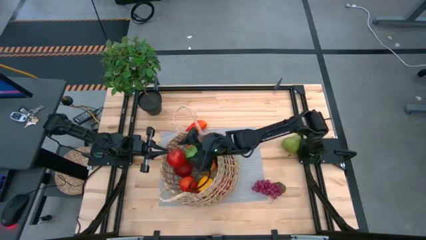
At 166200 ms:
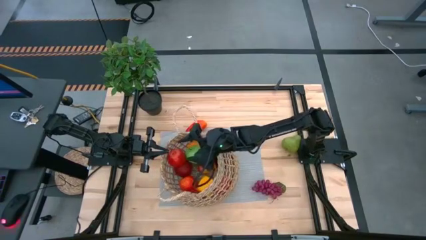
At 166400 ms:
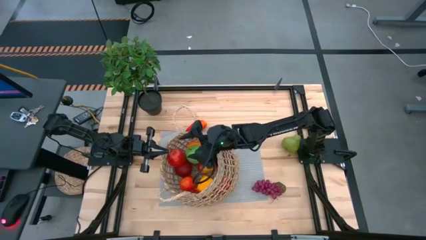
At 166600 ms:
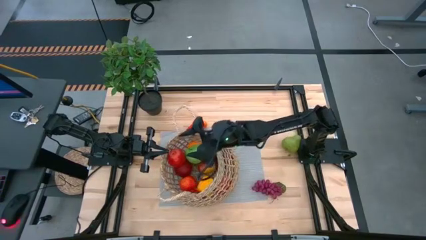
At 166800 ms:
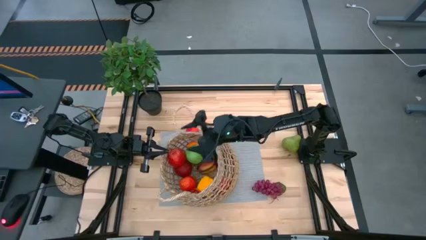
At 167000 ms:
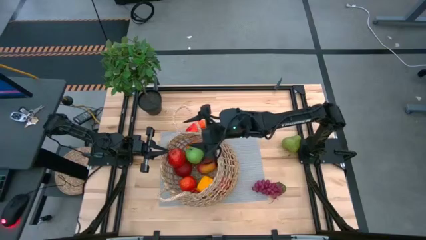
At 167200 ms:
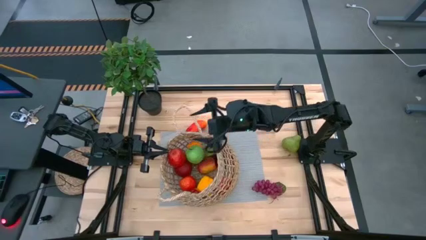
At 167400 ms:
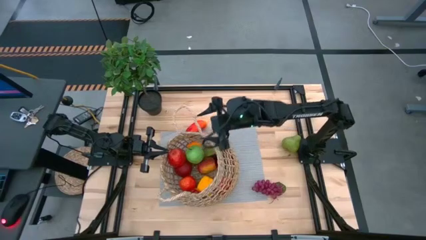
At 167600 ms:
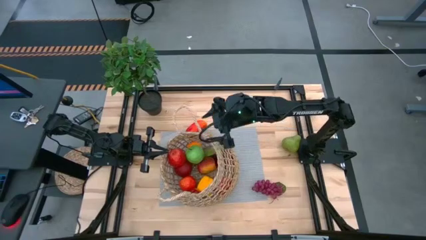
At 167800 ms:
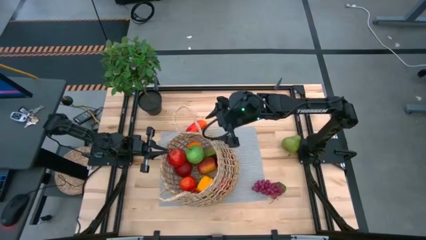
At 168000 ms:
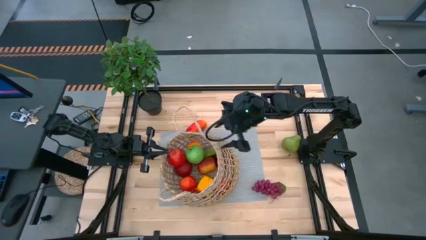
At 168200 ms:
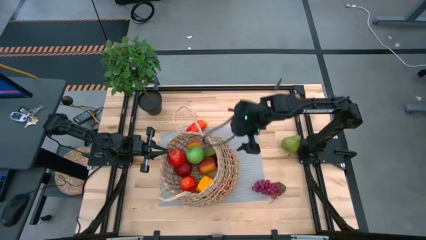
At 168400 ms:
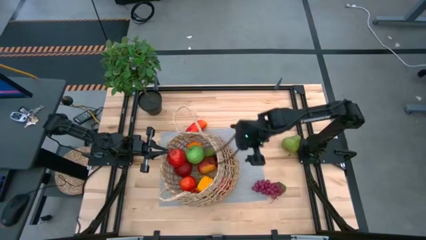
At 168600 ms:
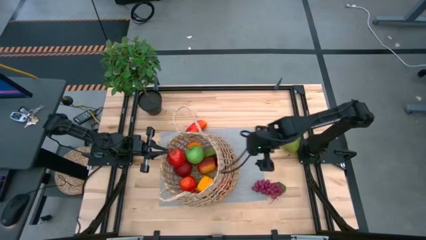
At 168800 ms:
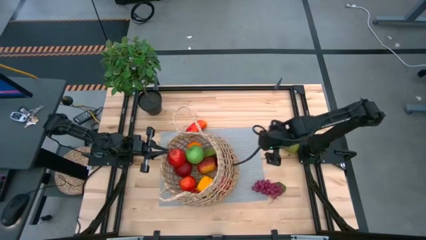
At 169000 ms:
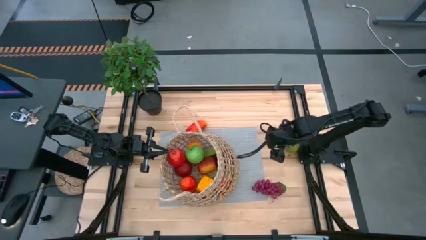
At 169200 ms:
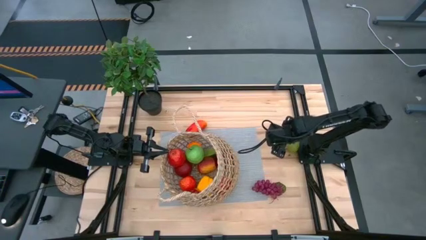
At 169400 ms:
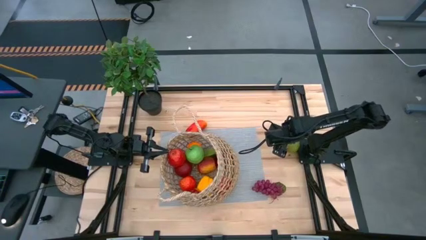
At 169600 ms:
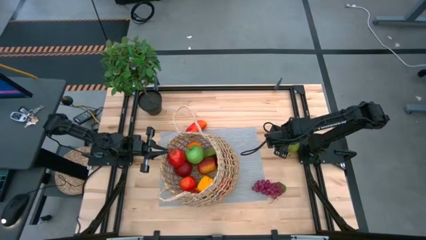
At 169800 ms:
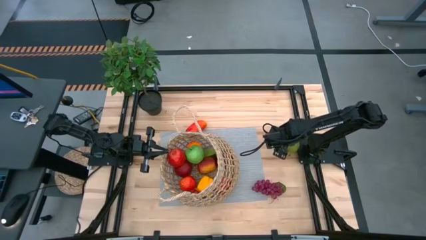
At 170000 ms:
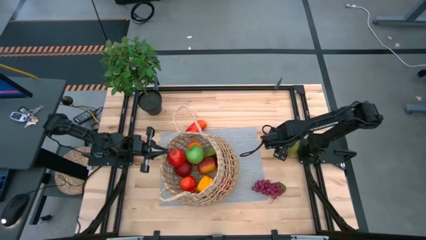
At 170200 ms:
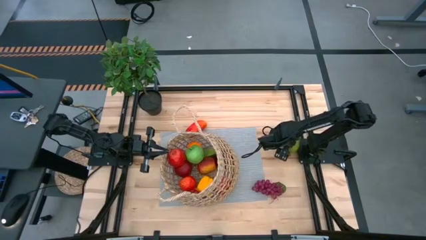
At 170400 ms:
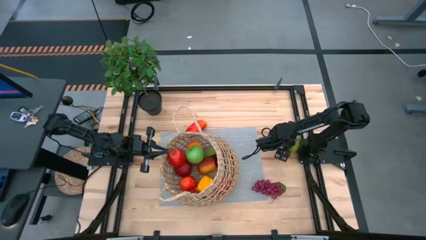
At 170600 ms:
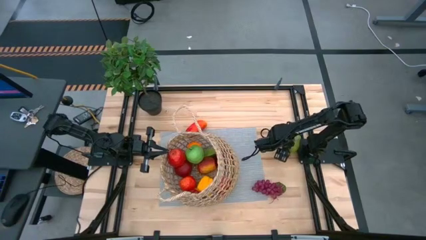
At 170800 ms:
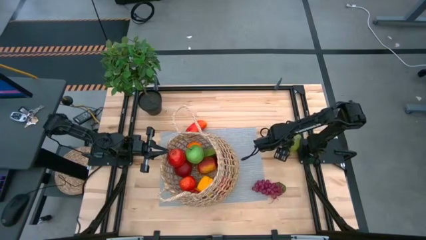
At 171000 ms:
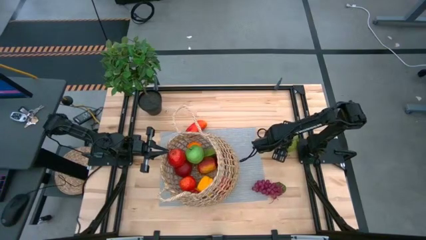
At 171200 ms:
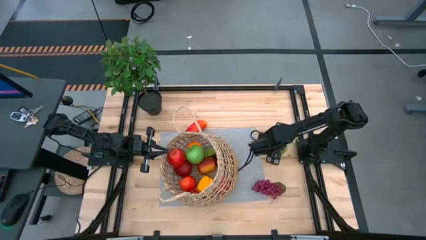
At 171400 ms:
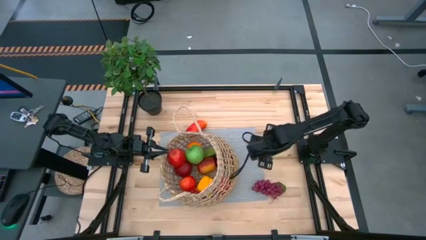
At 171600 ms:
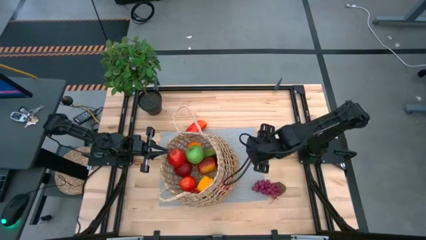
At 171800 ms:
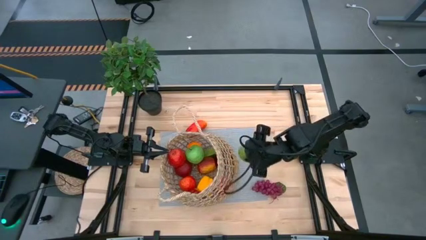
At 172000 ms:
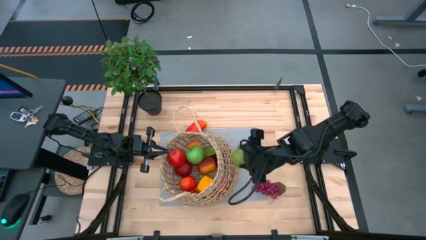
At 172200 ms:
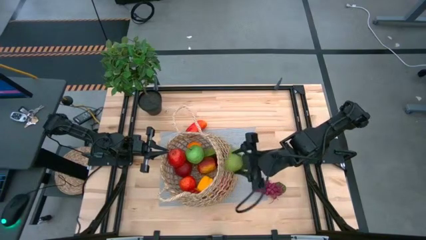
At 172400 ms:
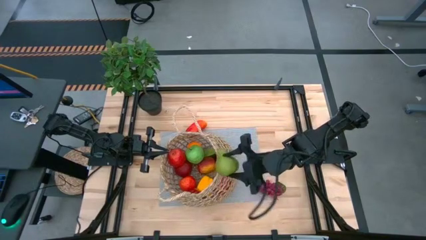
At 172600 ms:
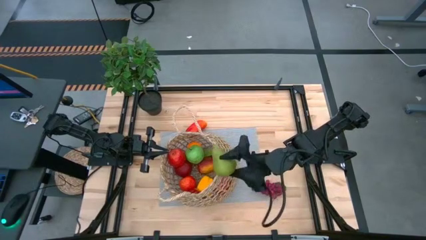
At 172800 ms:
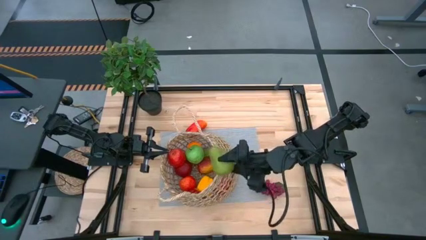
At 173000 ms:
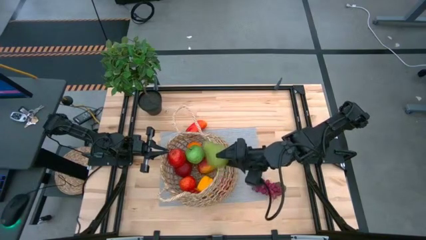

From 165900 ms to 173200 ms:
Task: Build produce basket
Put the green pear into the brown woven basket

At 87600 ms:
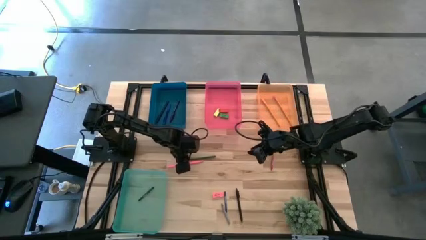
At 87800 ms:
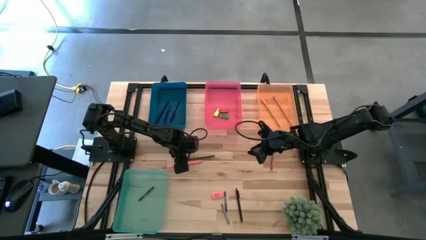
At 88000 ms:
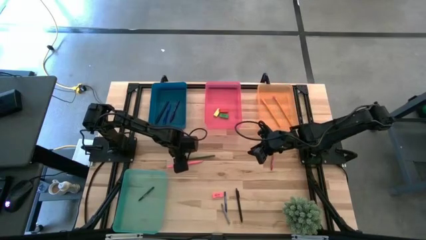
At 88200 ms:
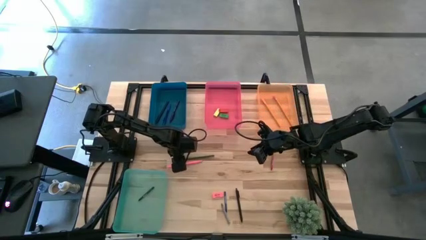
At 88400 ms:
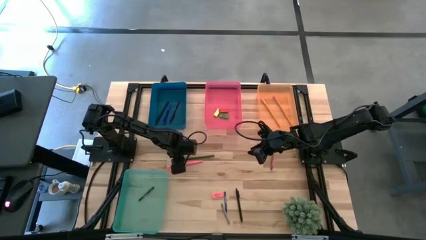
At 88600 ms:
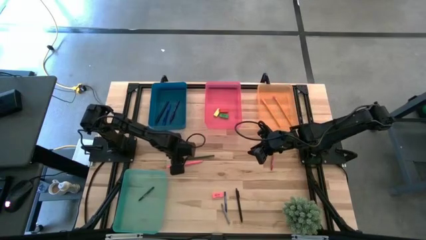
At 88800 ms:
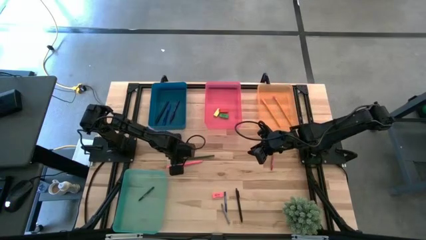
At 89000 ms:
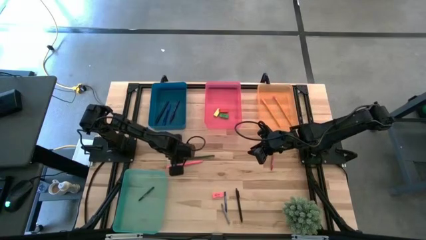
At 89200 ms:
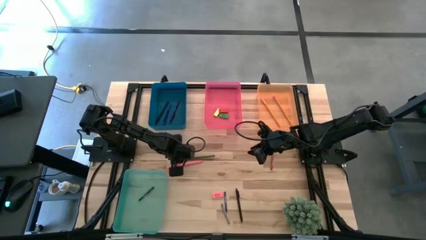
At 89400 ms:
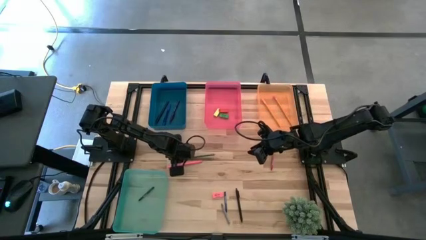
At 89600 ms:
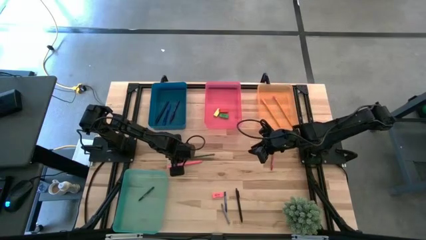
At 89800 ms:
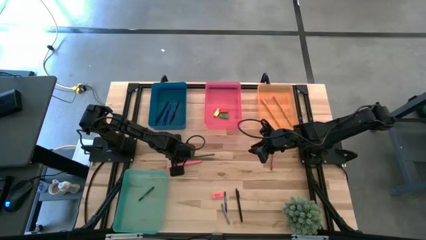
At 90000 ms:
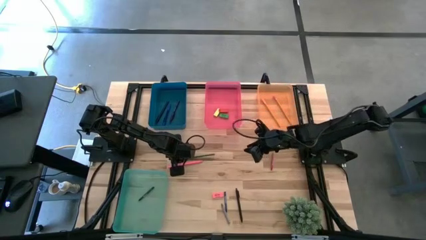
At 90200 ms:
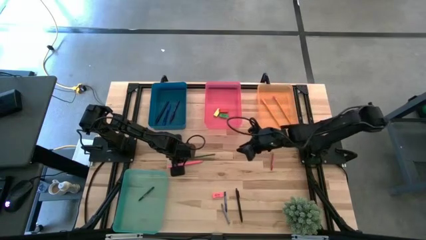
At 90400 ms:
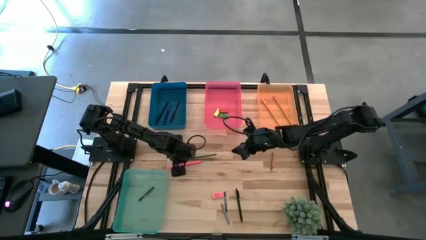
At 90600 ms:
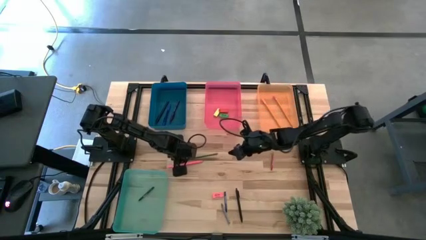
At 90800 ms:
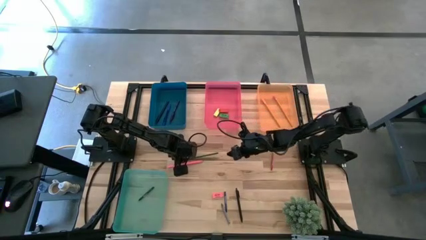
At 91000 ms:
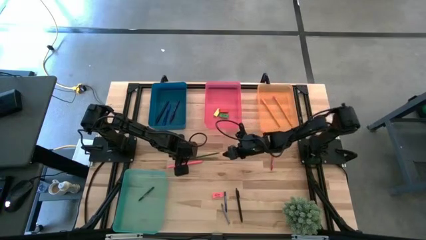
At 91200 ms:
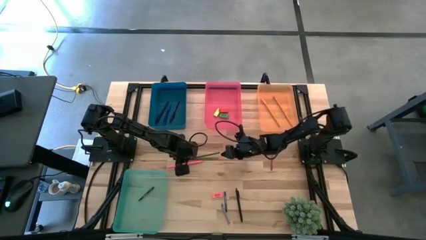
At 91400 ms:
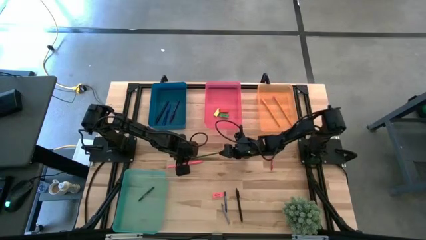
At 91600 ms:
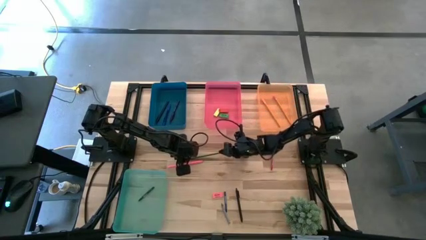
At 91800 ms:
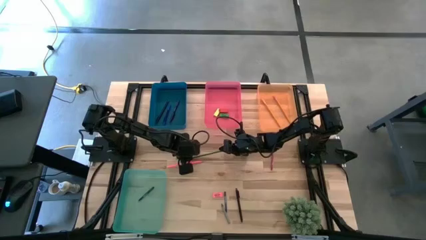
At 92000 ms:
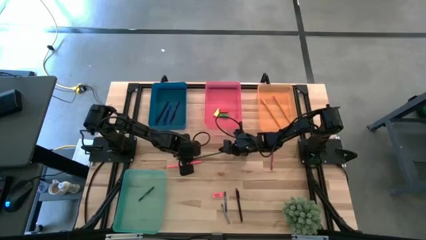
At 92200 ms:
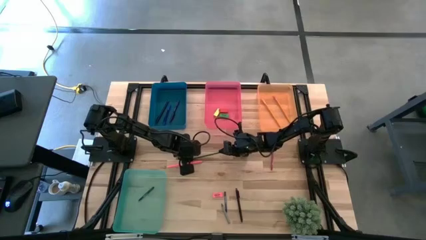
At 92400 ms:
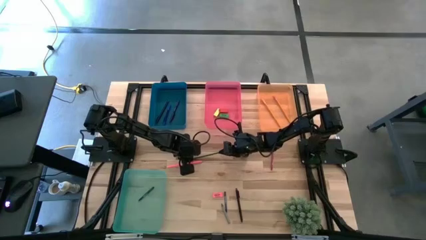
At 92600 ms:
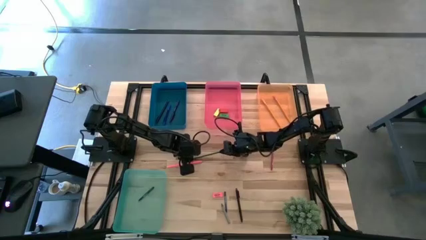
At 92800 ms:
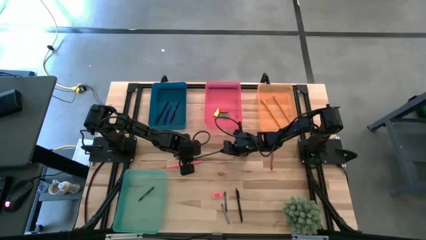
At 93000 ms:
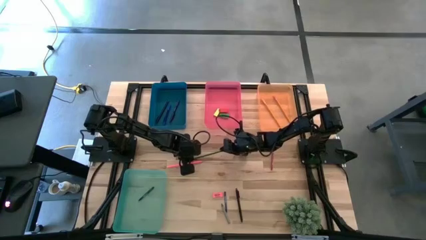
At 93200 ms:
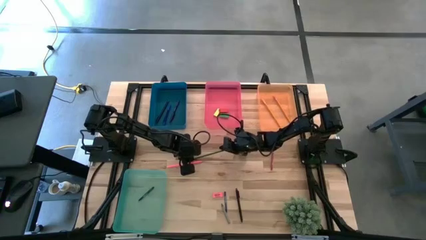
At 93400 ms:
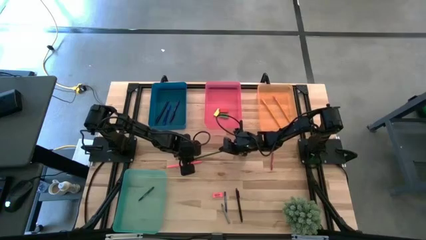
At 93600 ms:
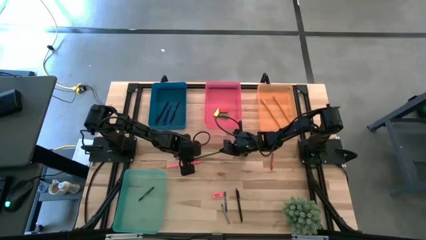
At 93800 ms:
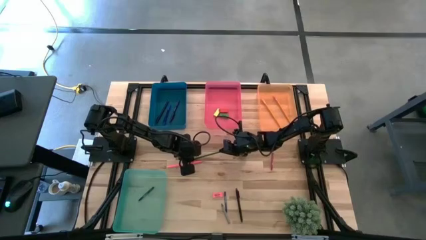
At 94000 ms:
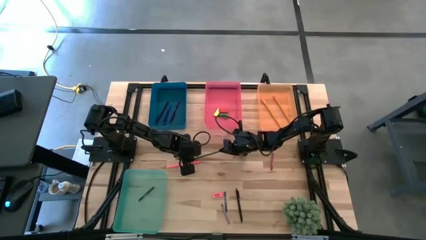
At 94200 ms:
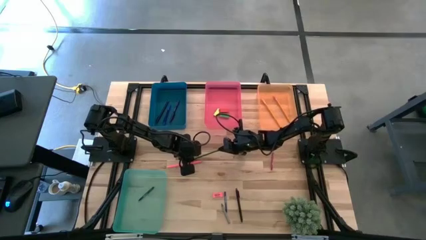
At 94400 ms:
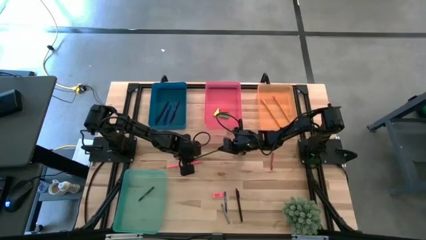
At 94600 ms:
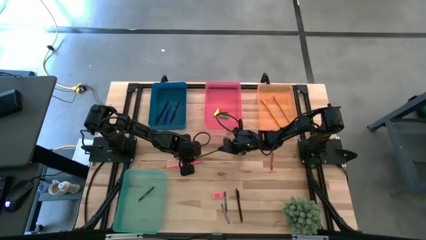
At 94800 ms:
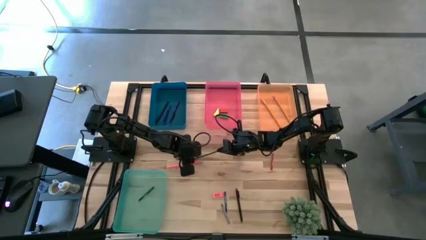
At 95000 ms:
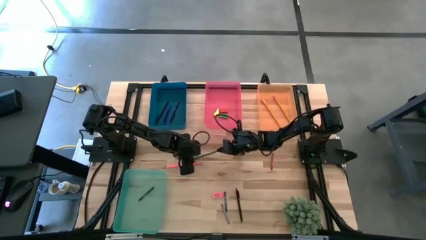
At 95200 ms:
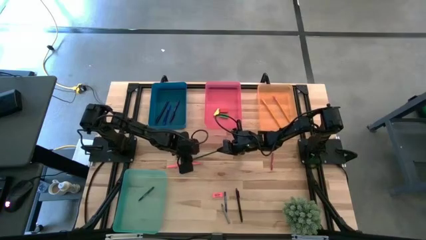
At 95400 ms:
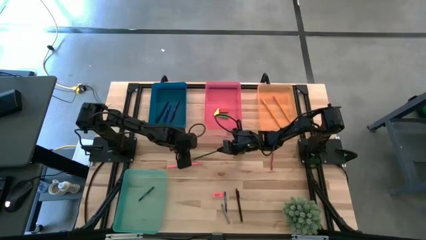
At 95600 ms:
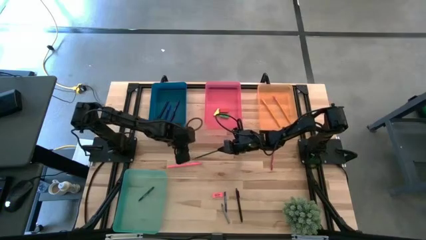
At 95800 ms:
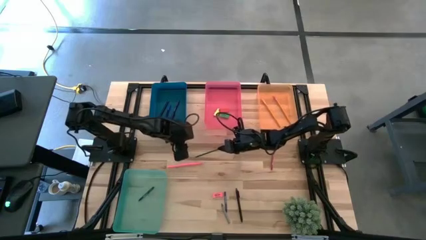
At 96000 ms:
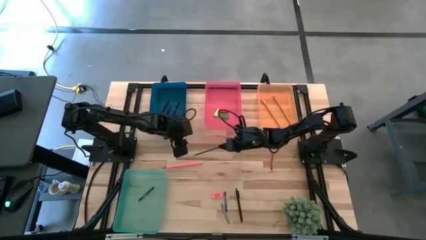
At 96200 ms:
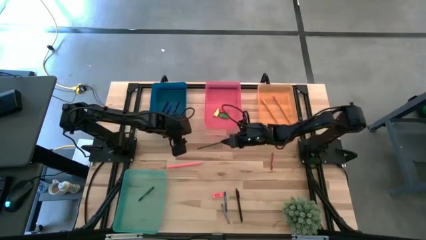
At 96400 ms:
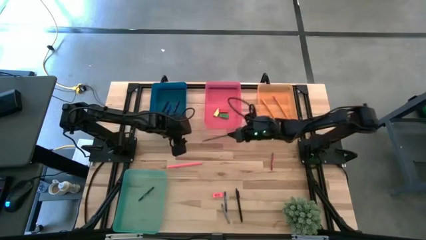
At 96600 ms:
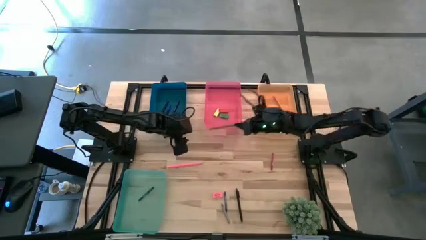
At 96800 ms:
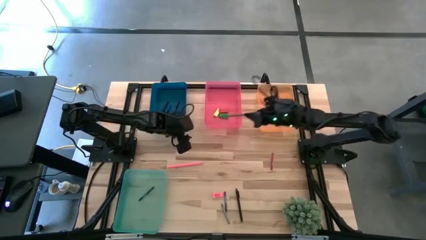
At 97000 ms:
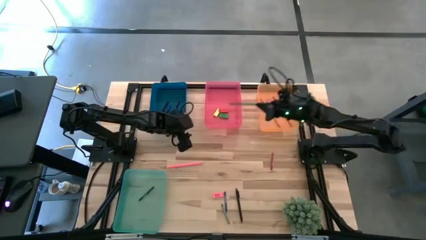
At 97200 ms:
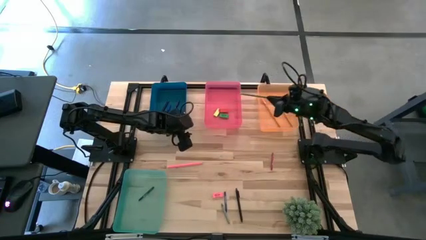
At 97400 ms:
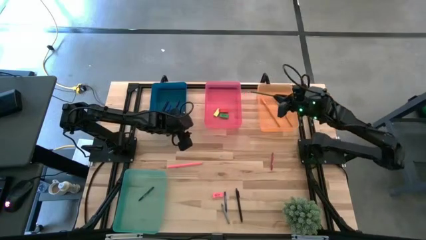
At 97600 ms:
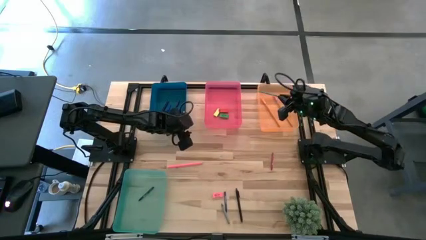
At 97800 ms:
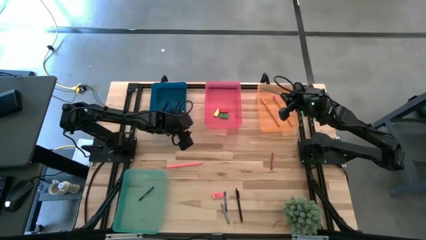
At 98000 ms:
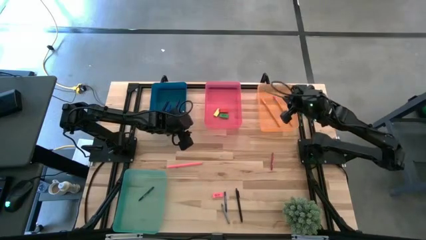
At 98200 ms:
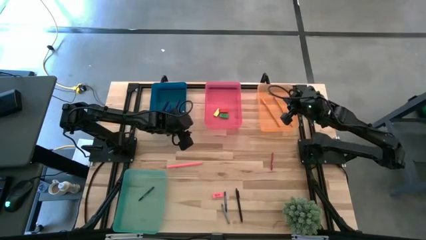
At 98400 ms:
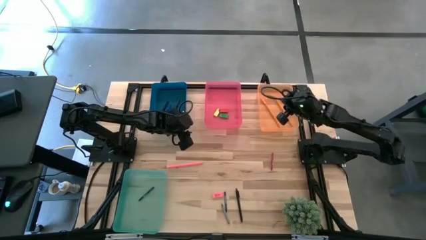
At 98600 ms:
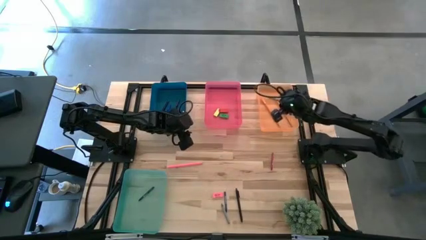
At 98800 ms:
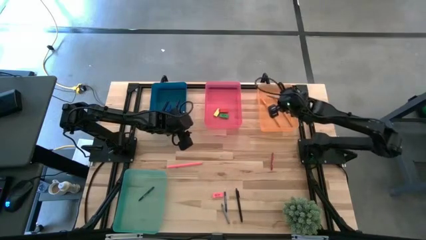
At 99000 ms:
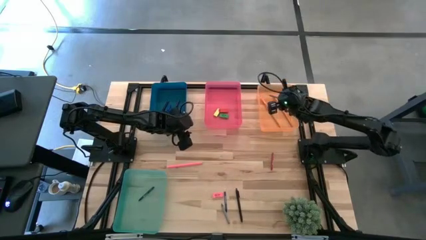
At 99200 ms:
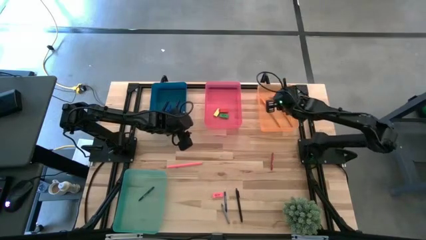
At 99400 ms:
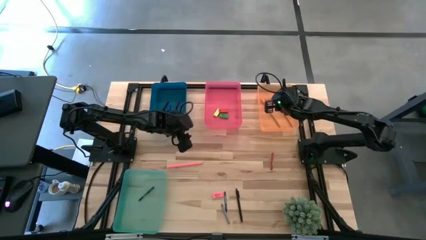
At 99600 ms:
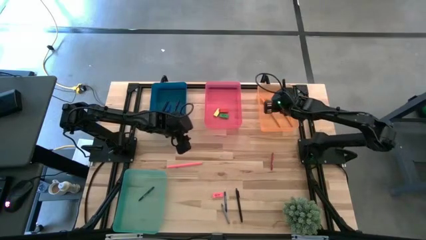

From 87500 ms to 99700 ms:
Task: Sort crayons/erasers/pens/pencils in bins
Put the green pencil into the orange bin
